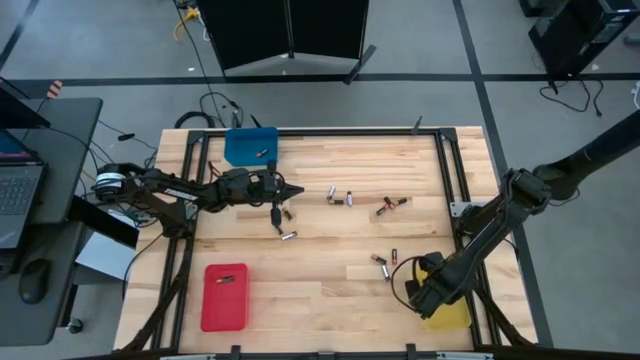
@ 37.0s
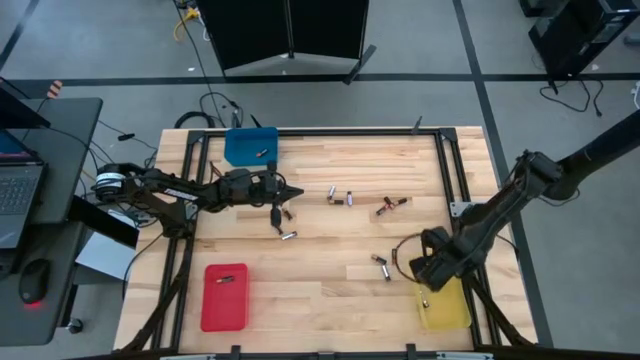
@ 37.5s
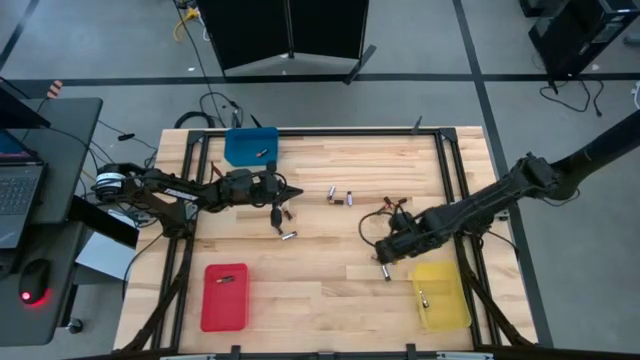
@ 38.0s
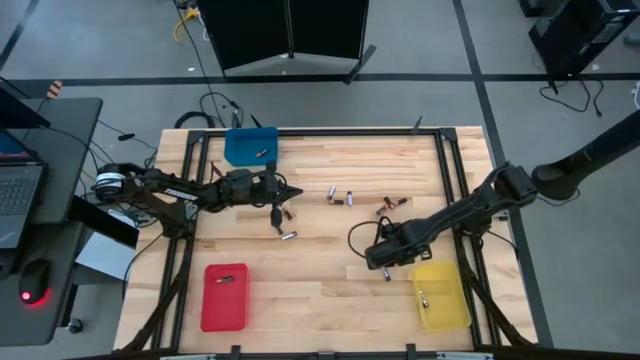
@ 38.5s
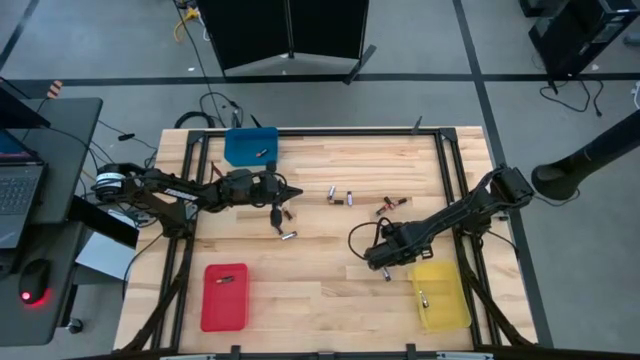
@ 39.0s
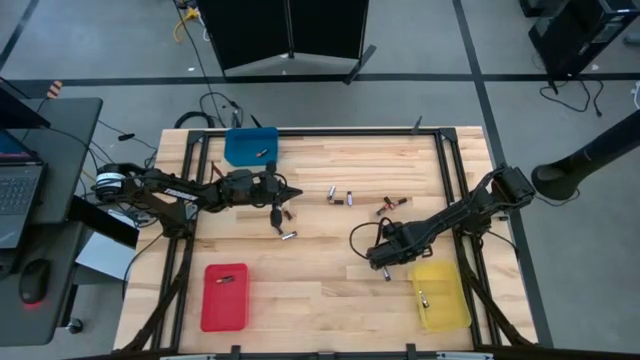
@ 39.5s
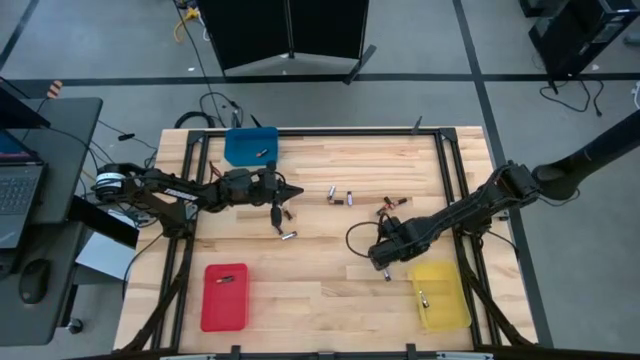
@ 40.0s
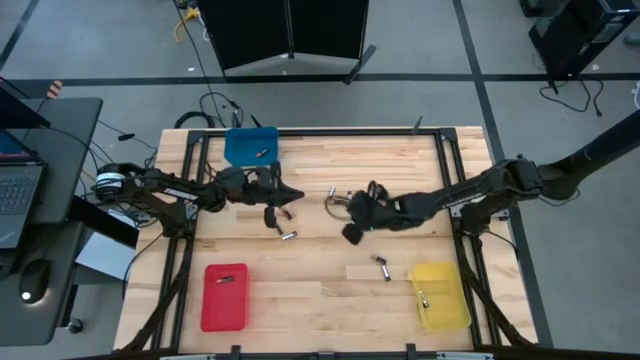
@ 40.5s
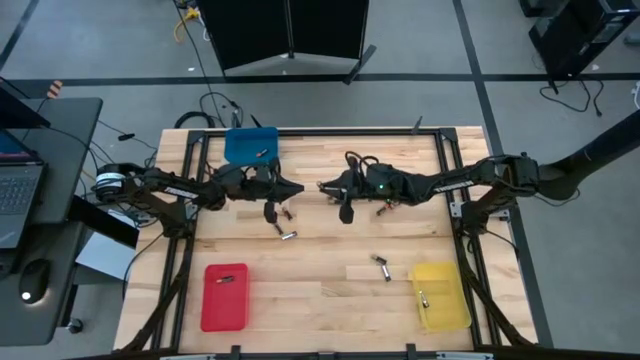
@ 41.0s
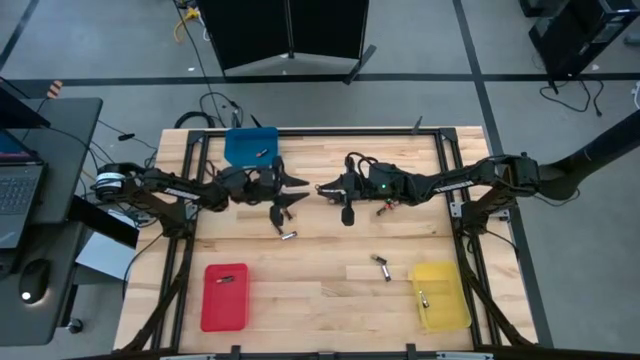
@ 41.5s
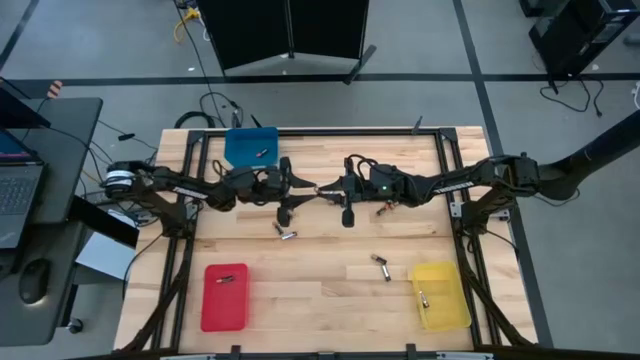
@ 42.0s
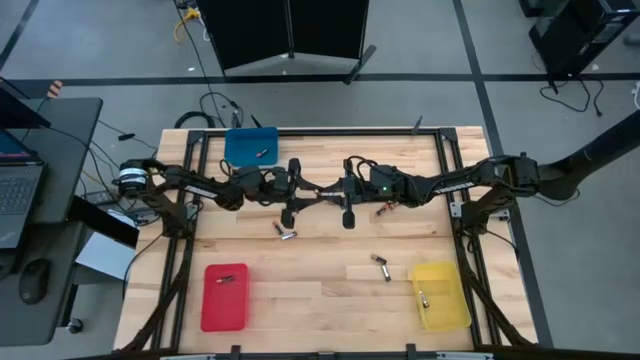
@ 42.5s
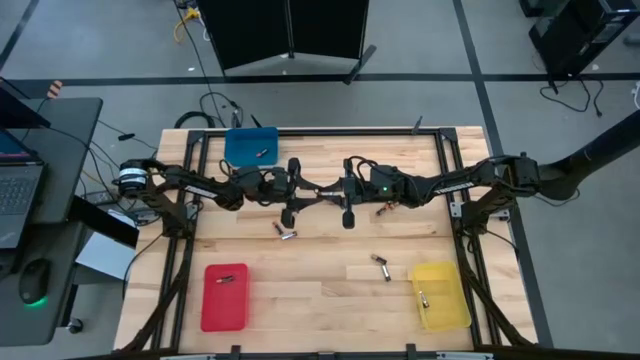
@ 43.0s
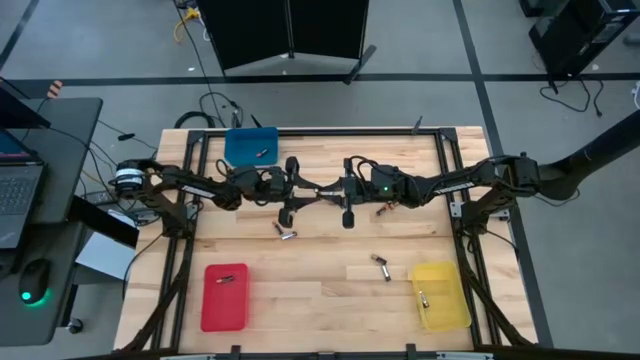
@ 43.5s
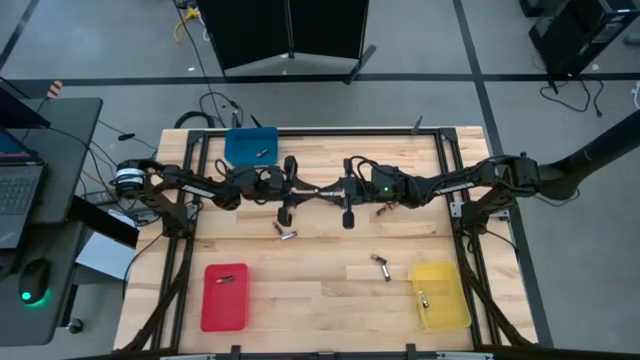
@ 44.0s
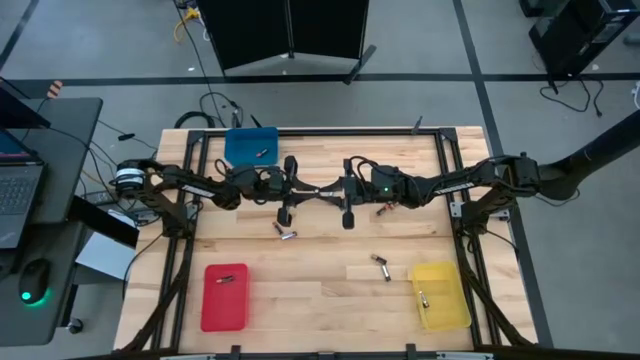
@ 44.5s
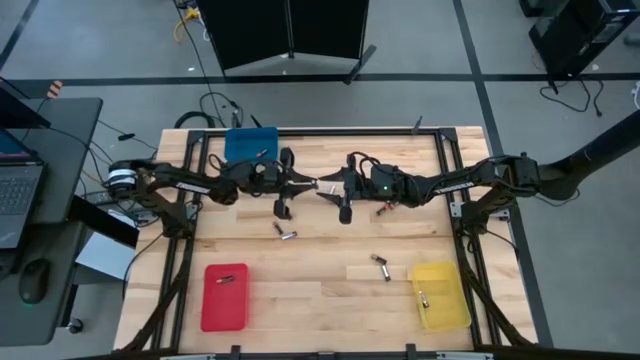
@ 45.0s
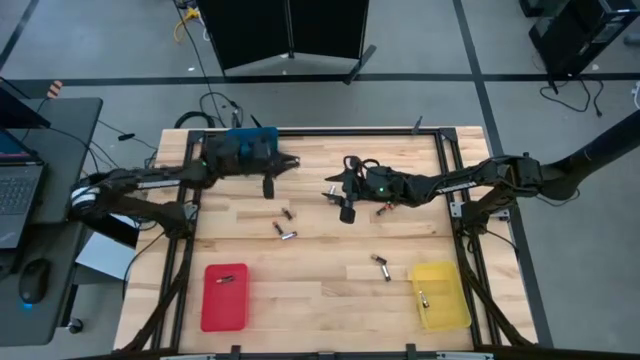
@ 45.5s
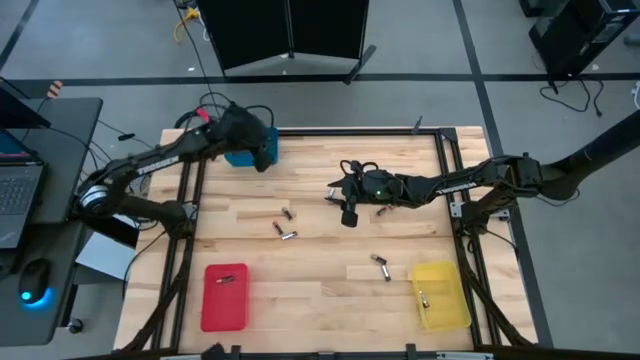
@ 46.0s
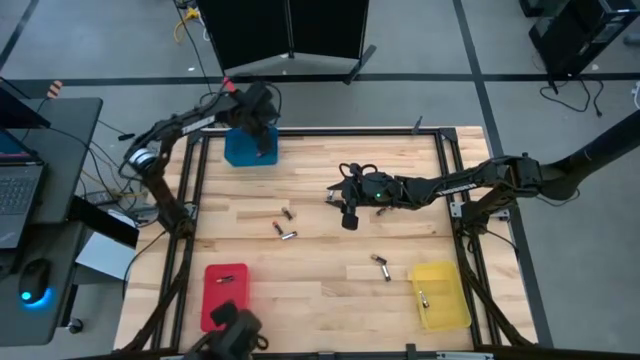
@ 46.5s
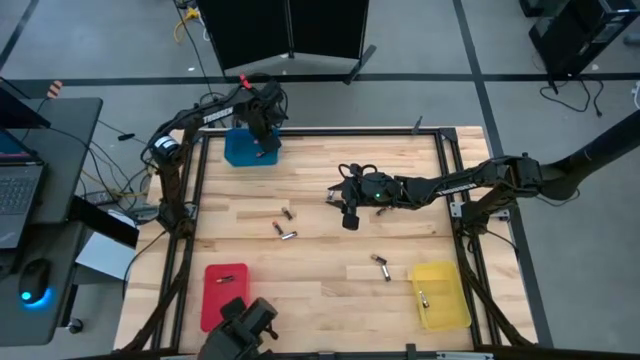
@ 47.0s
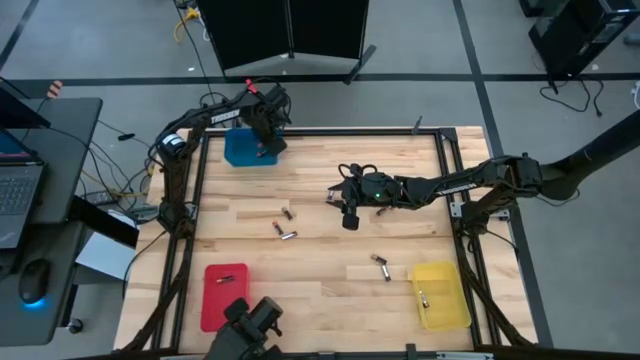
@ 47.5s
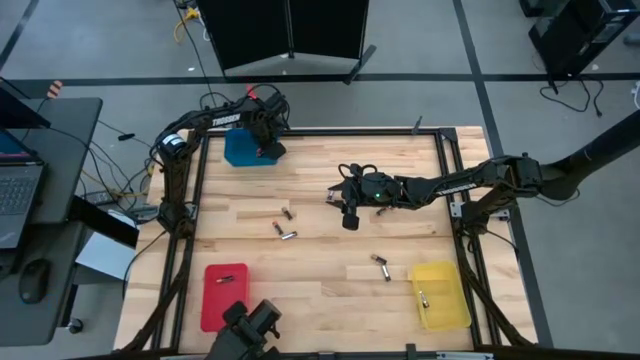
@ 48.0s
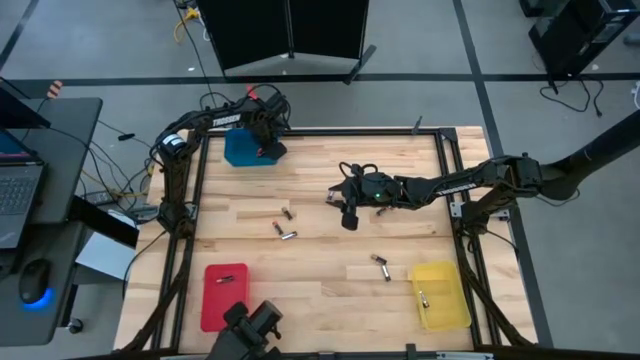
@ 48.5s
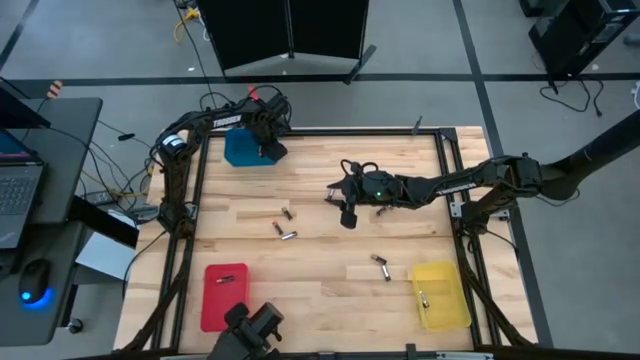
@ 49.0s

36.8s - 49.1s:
Task: Sort batteries
Put the red battery into the blue bin

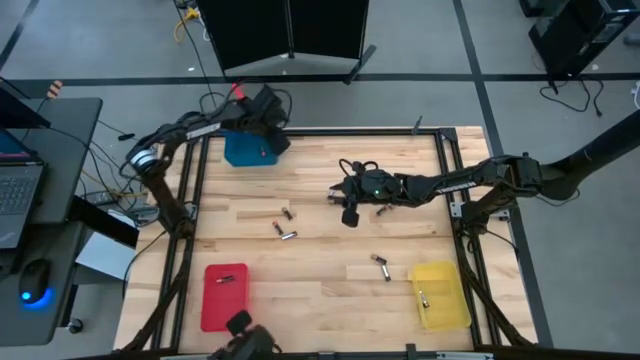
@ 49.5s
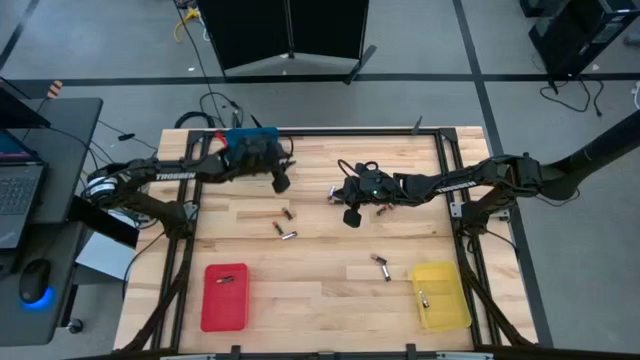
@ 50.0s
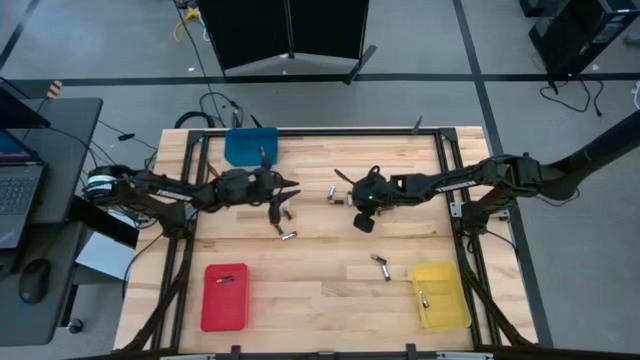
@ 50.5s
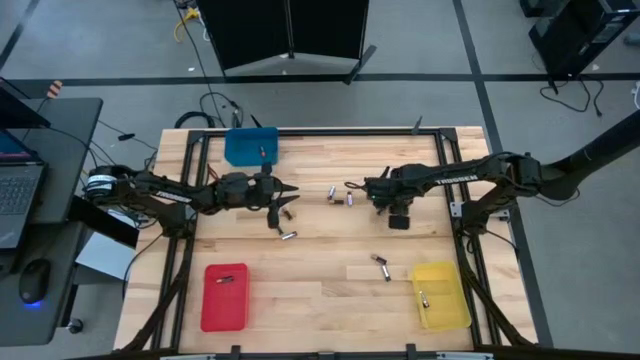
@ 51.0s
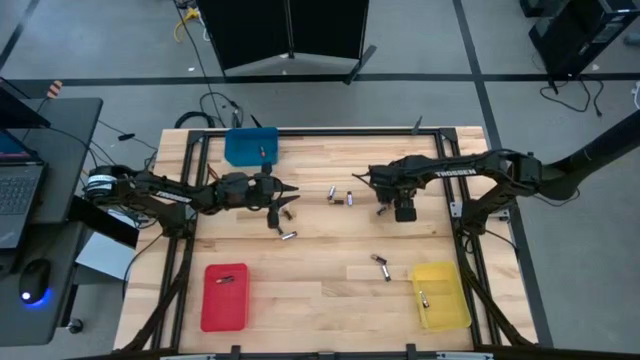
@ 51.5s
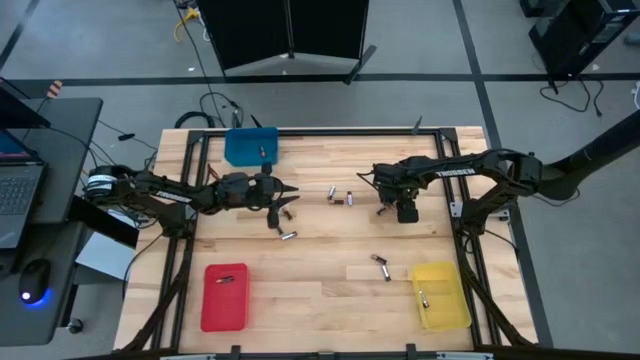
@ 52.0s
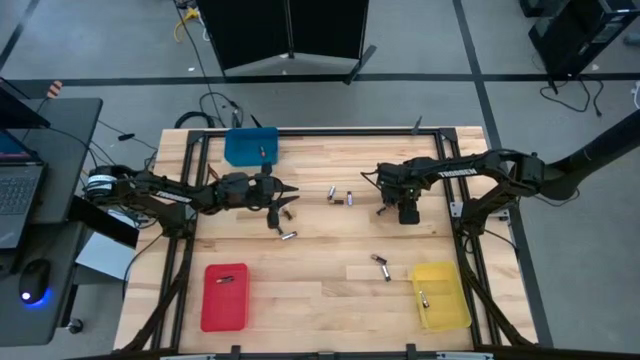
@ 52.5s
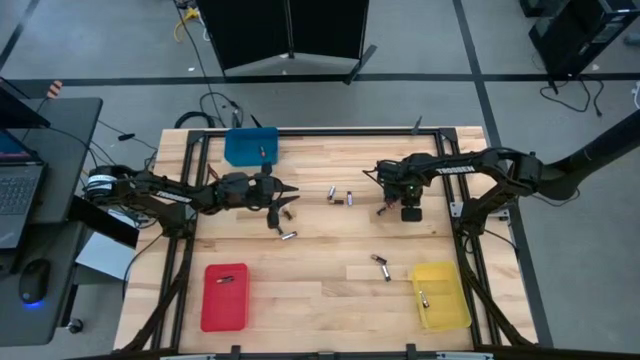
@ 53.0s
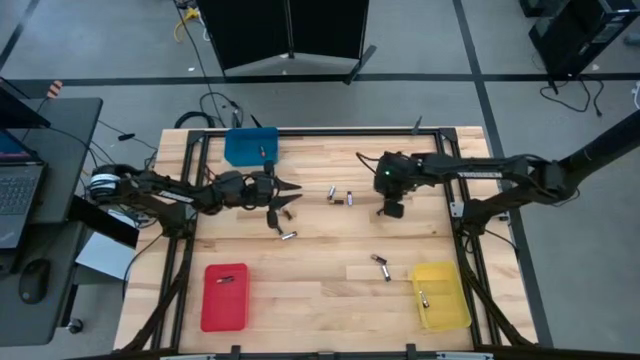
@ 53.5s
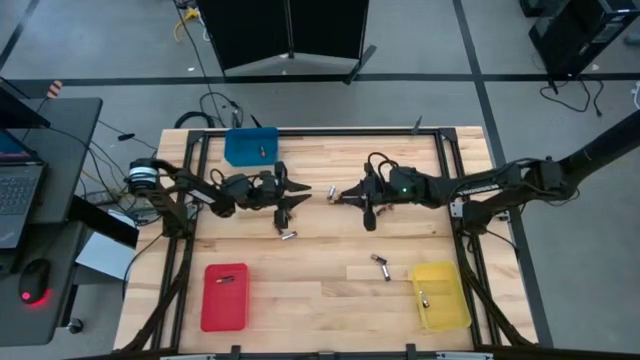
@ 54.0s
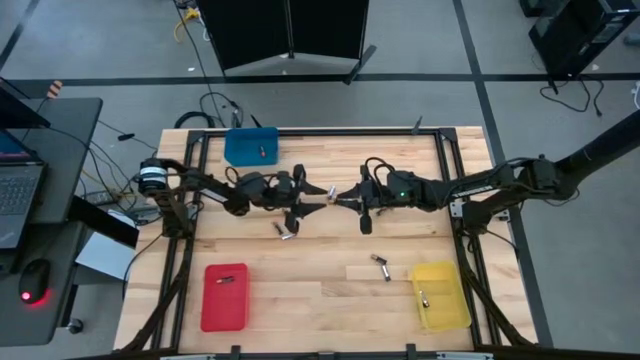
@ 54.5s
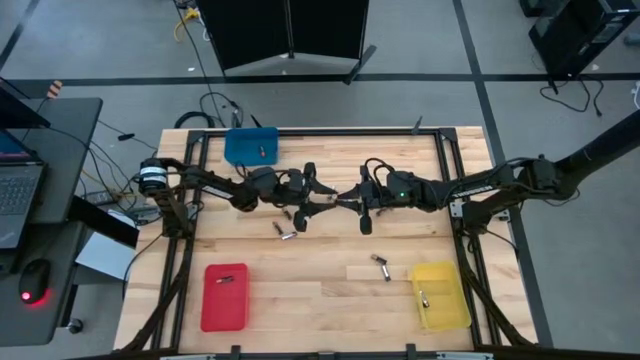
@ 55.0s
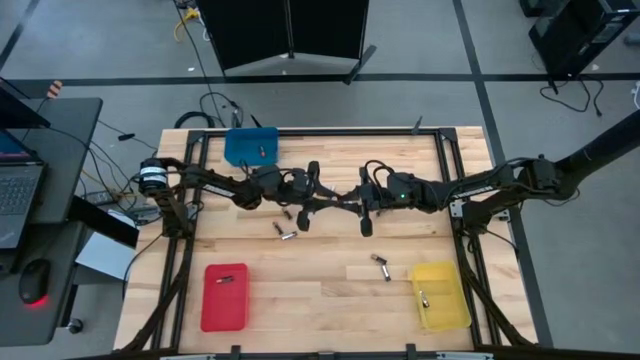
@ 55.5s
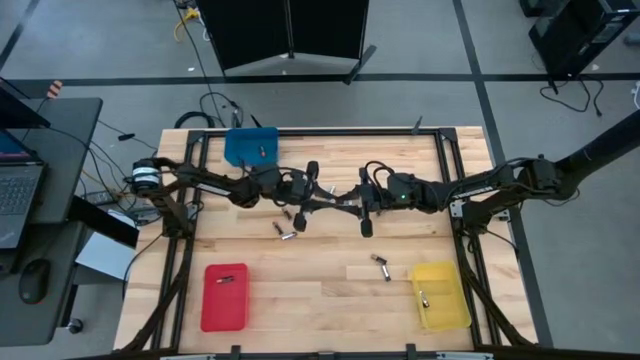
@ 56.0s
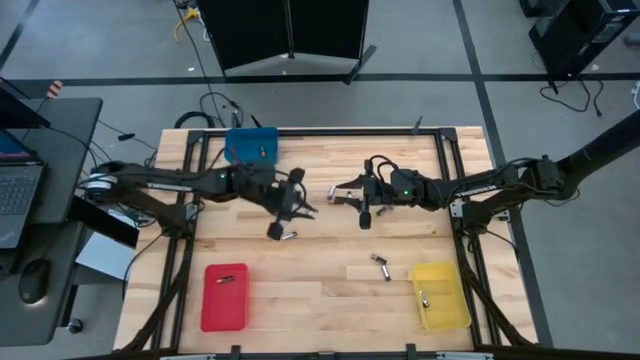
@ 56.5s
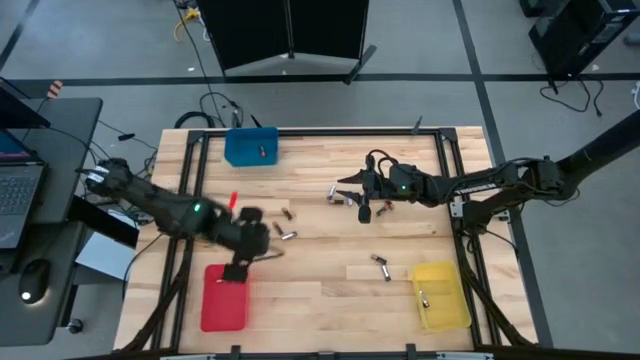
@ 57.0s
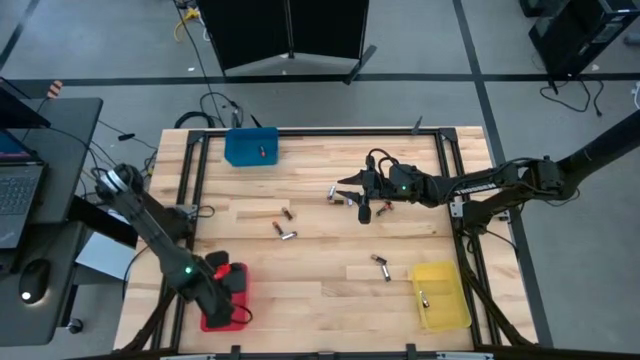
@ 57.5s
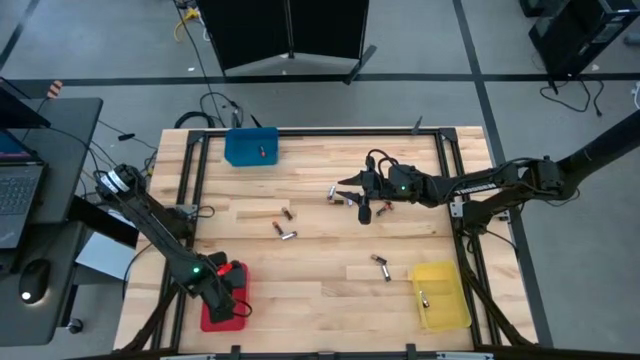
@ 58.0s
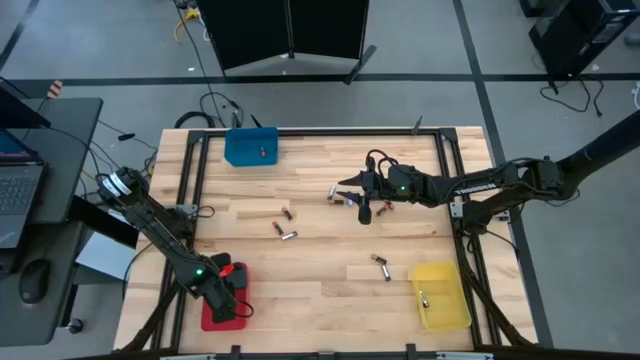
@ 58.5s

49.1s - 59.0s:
Put the brown battery into the red bin

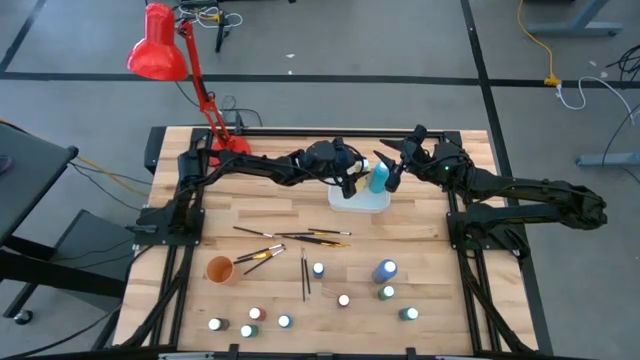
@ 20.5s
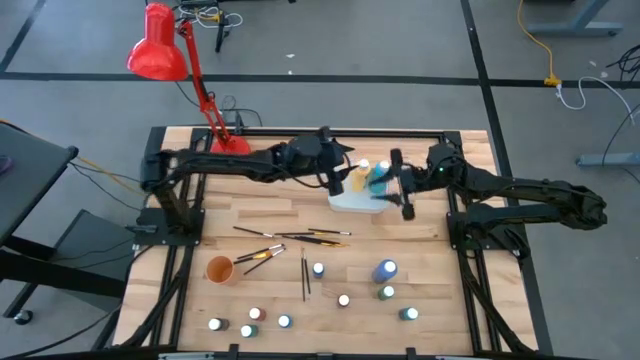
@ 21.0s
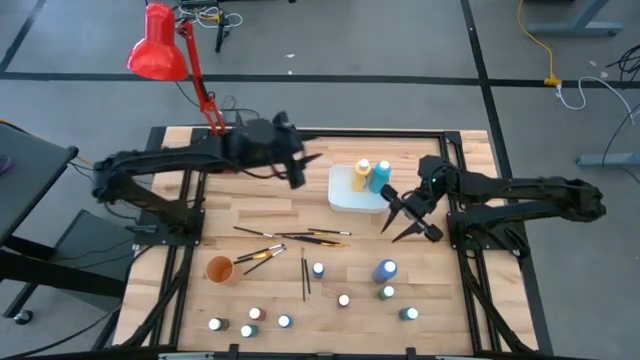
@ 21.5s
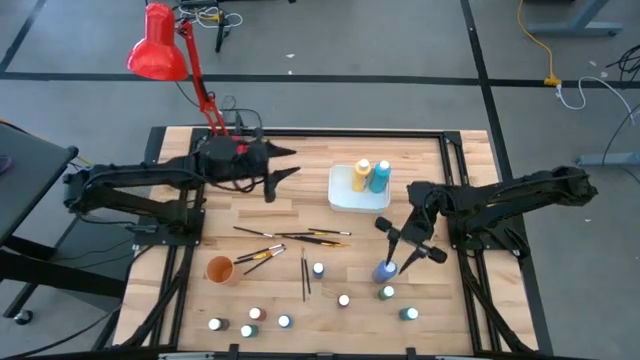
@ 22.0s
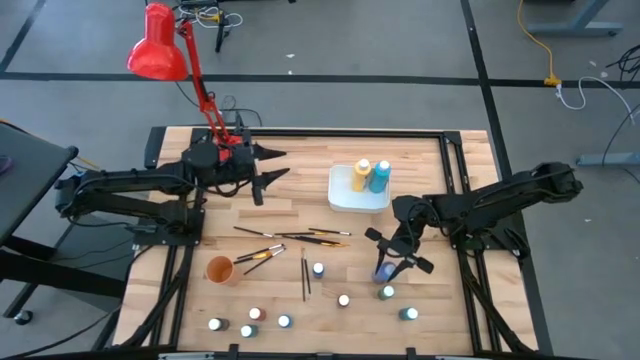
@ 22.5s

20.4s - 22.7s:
Task: Pick & Place Paint Supplies
Put the large blue paint bottle into the white bin
